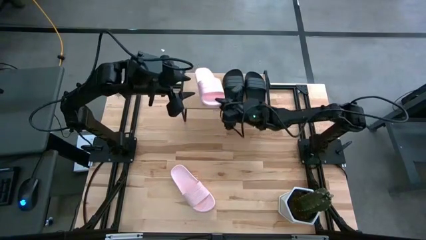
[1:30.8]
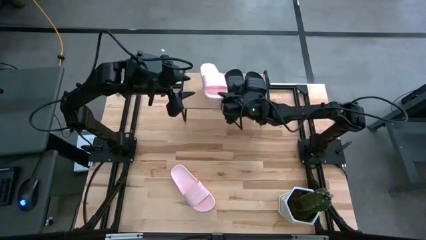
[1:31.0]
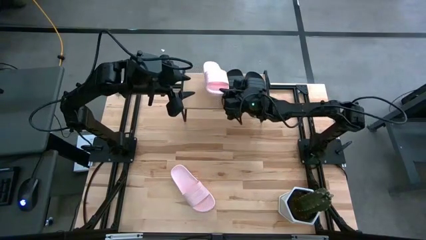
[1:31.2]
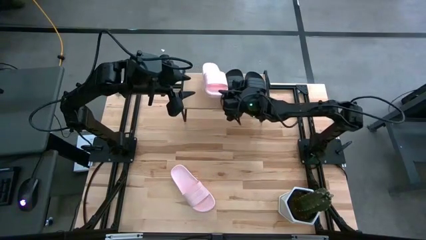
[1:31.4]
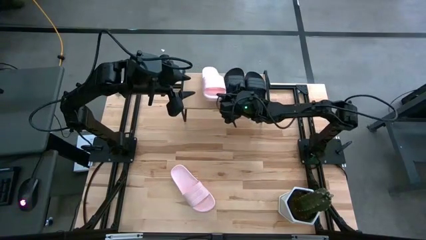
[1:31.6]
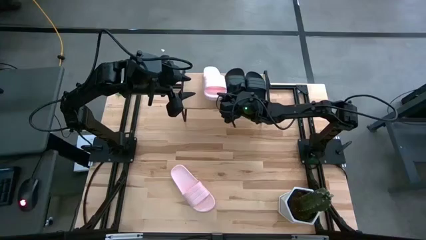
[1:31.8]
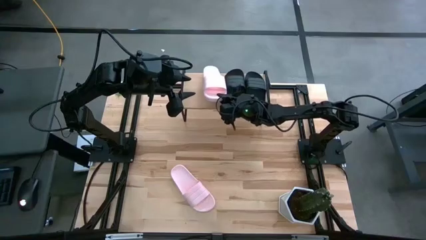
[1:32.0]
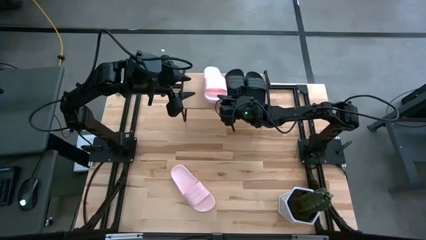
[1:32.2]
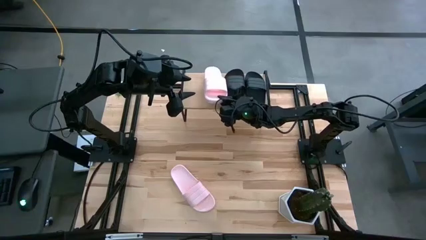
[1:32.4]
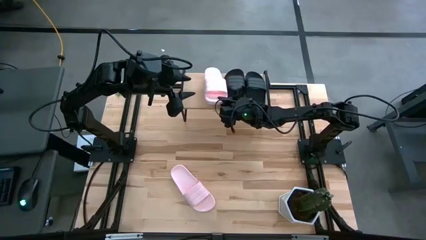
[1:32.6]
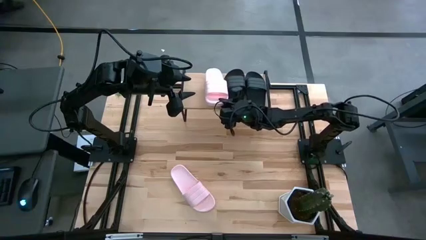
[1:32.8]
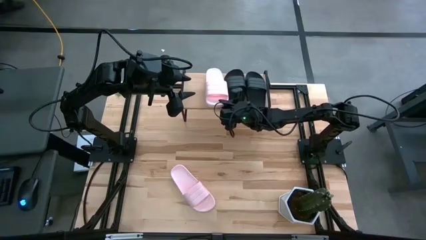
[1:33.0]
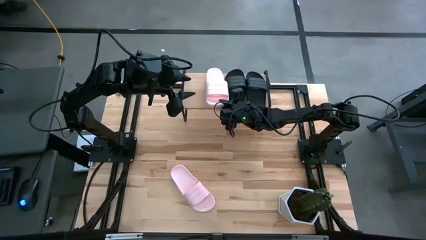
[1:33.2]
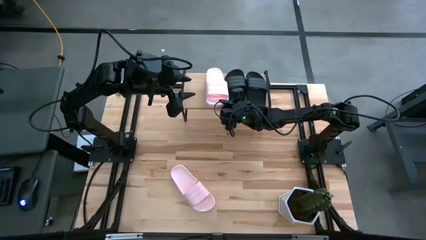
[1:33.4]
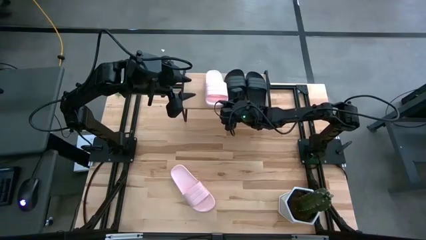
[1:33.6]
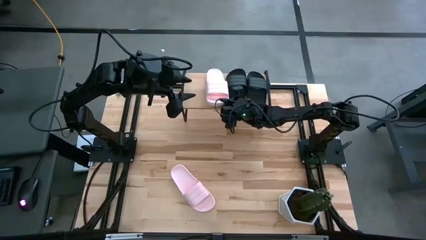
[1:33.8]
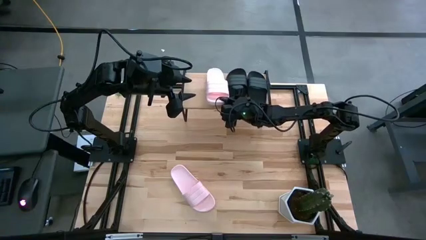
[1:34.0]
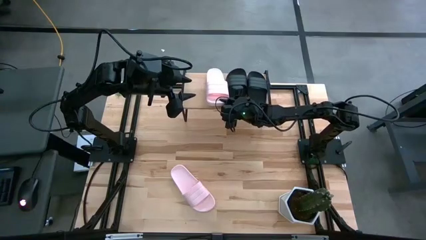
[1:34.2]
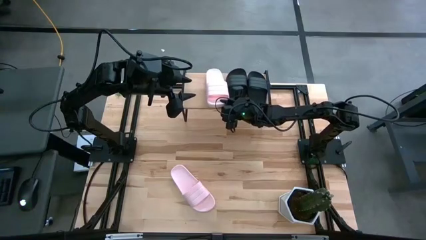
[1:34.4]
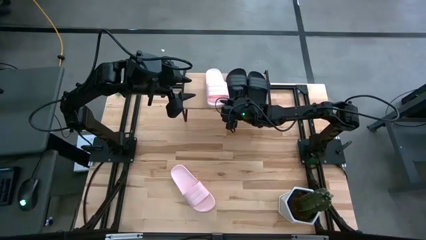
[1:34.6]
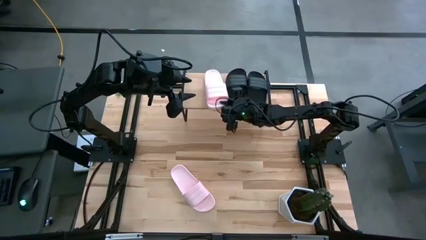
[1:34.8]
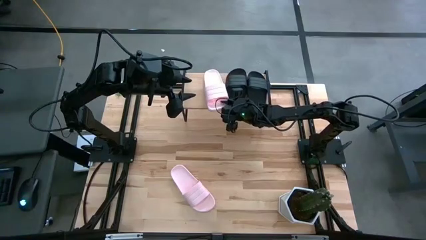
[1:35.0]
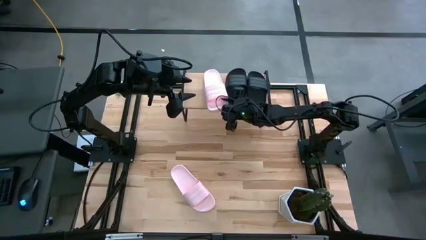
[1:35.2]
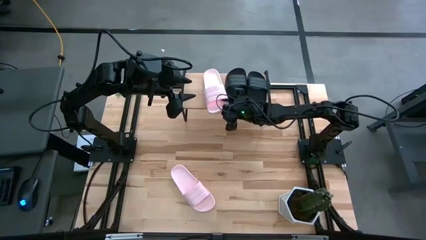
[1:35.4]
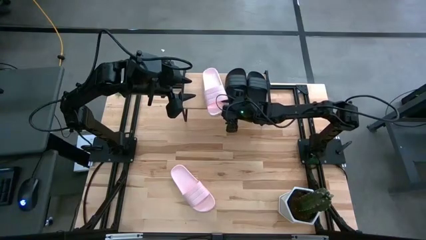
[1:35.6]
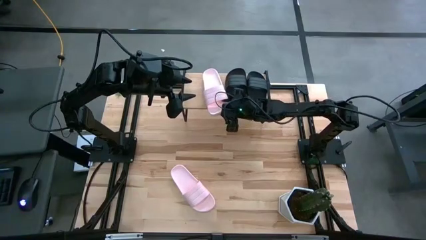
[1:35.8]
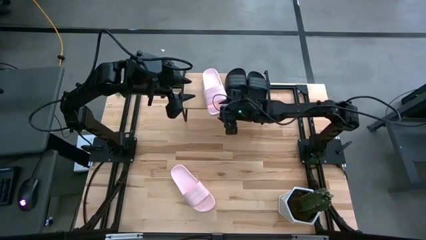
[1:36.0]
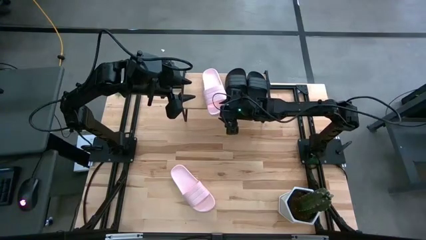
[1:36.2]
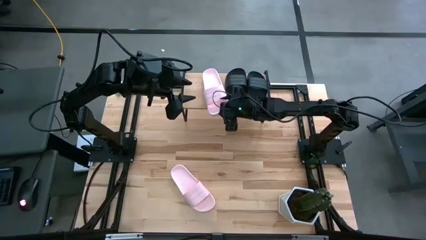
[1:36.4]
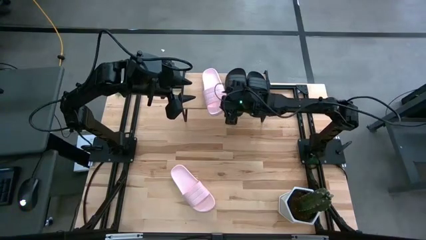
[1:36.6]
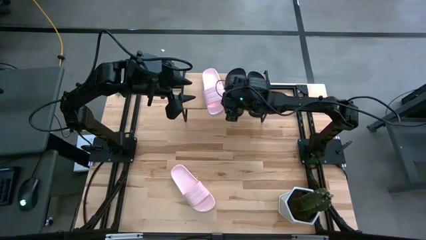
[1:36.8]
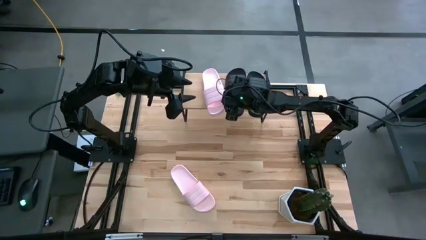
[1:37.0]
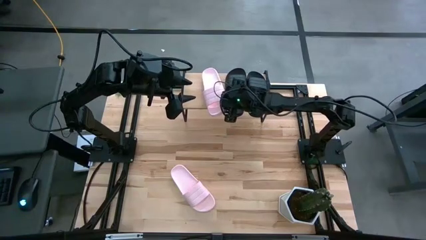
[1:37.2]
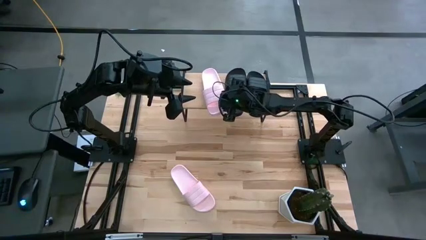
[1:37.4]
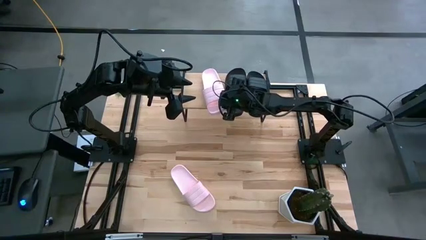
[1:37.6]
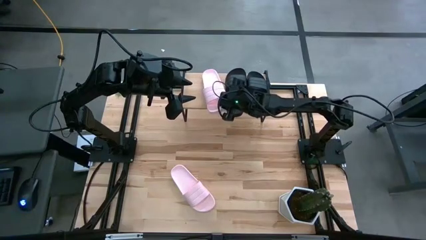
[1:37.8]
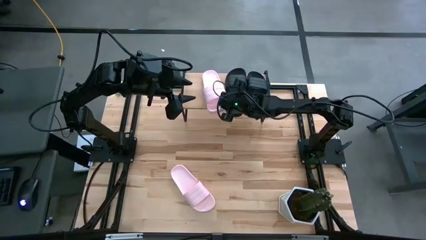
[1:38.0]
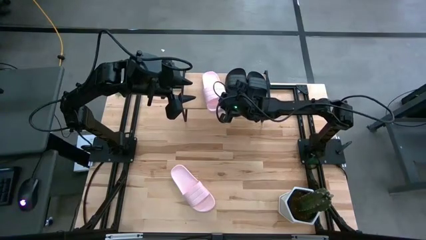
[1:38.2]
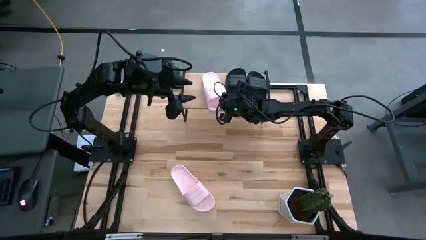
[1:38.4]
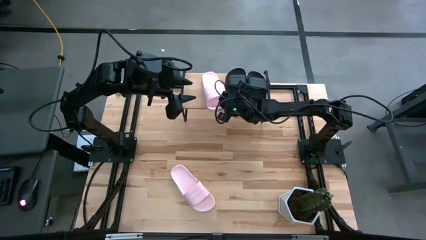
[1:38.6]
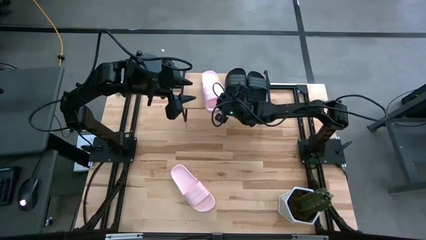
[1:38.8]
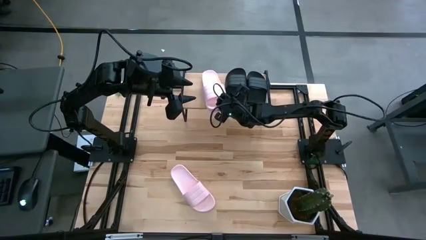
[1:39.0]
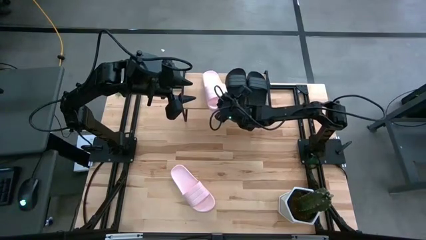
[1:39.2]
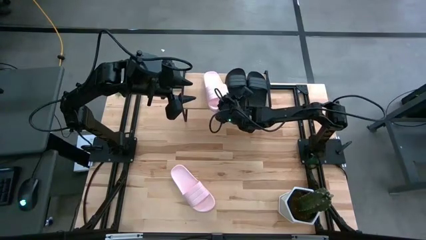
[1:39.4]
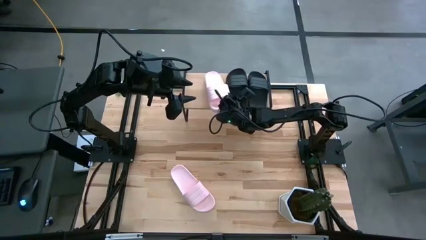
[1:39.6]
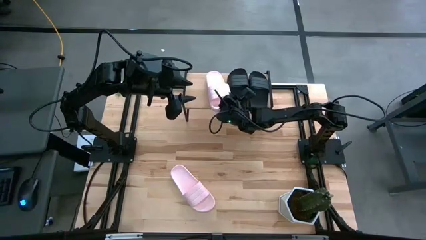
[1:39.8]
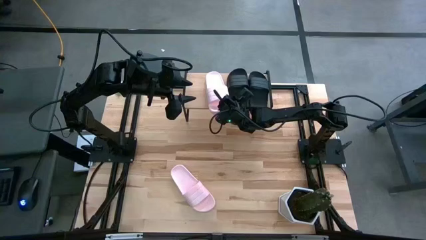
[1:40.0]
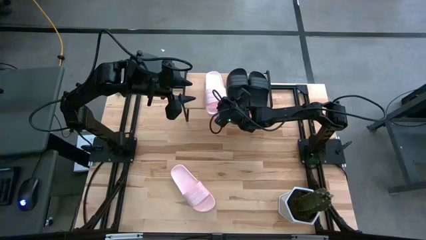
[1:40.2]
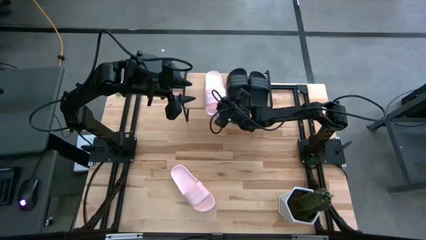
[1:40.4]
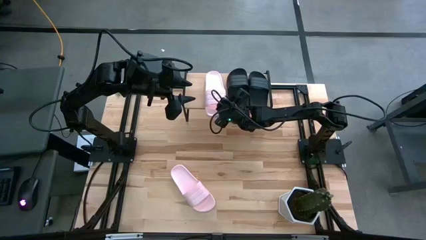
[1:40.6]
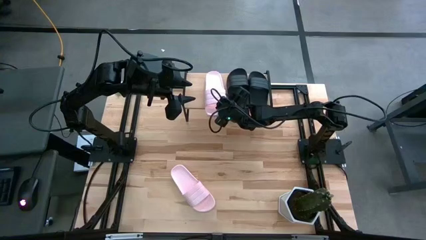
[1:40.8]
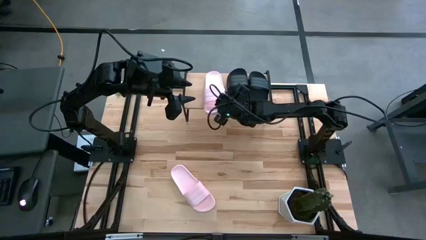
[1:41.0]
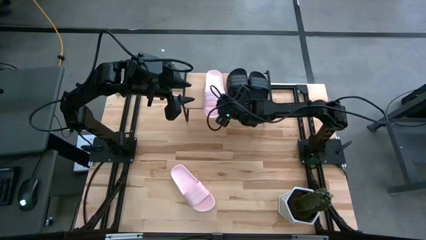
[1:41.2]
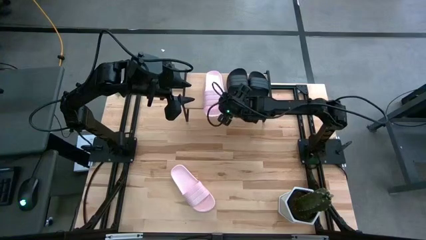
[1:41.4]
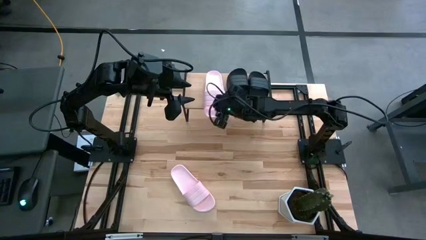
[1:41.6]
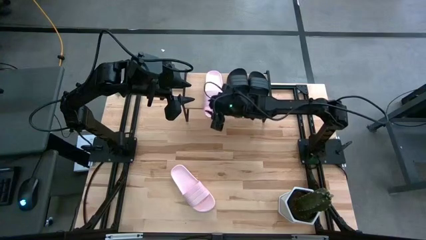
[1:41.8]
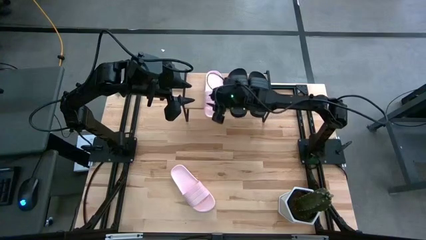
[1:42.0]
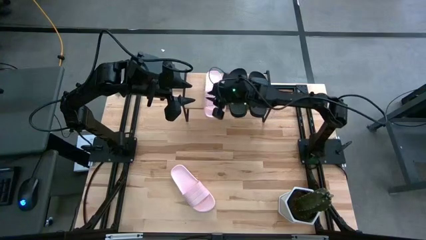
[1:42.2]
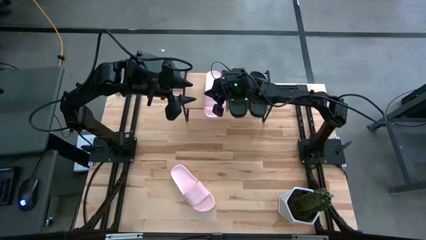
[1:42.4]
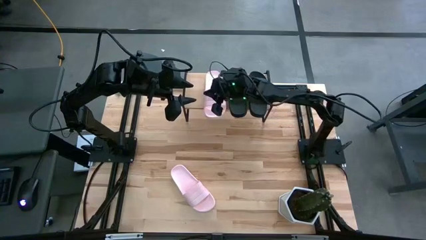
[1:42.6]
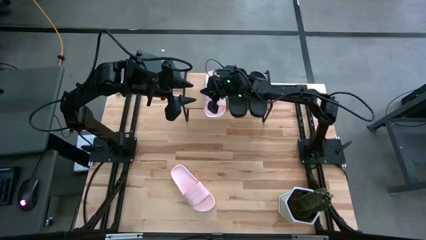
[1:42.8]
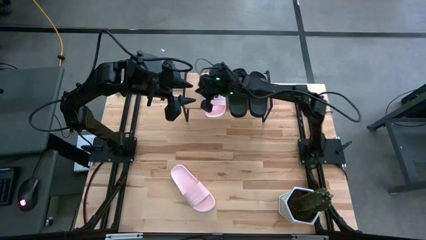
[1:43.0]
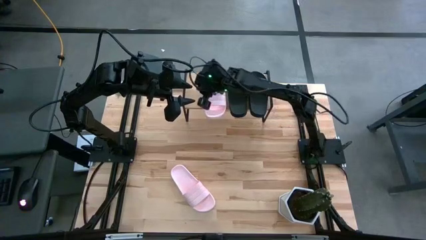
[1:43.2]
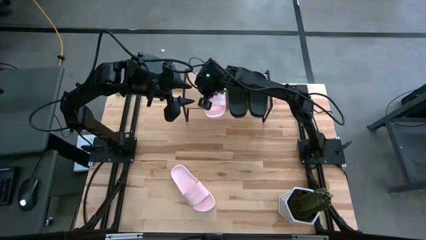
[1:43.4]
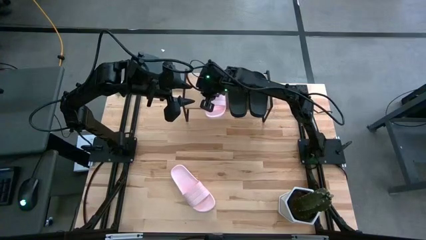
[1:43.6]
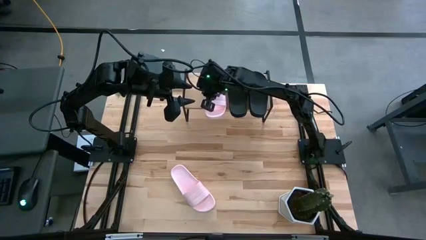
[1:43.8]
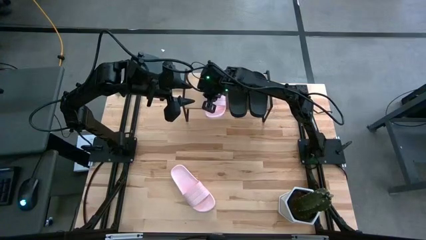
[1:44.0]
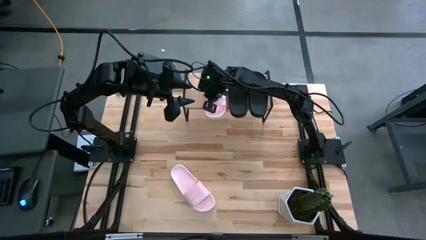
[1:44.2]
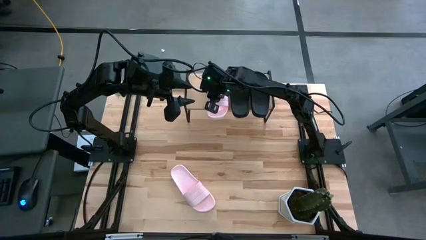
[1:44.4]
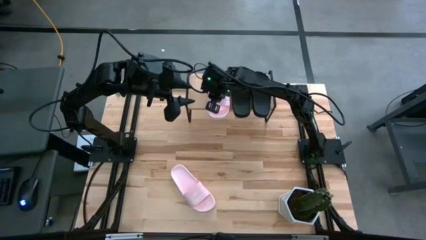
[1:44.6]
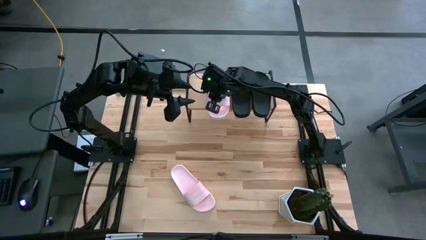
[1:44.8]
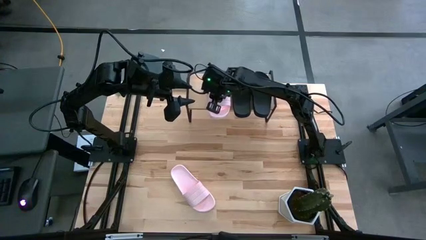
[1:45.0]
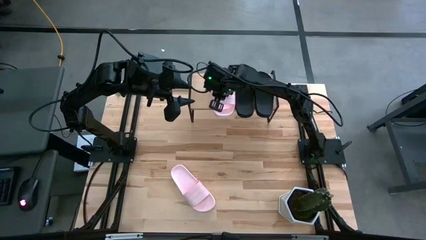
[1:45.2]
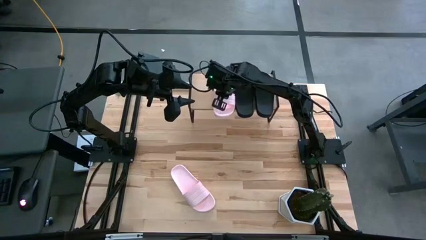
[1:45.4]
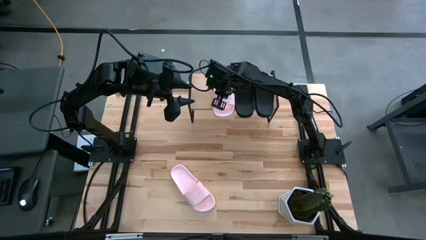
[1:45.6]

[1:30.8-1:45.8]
Task: Pick and place slides into the shelf
Put the top pink slipper on the shelf
